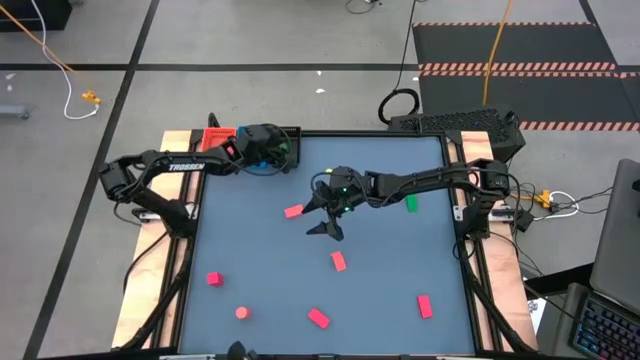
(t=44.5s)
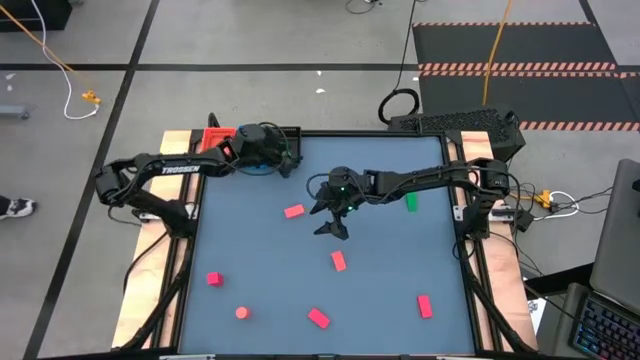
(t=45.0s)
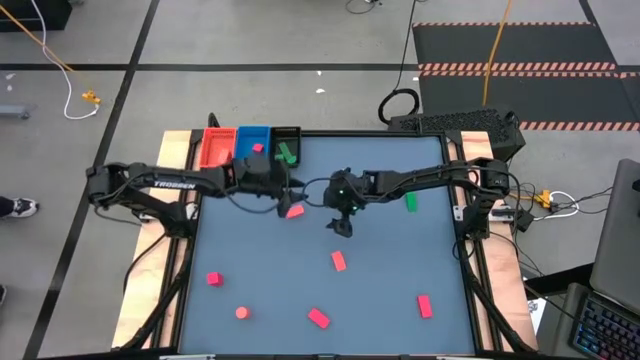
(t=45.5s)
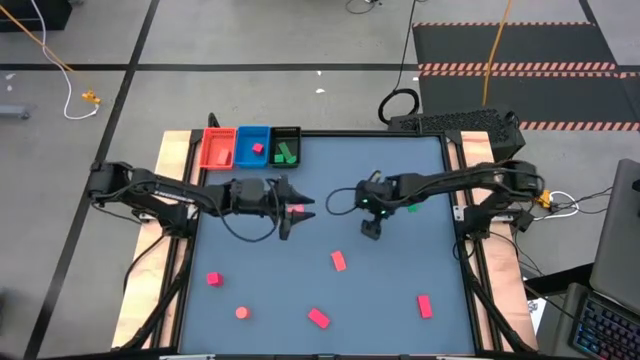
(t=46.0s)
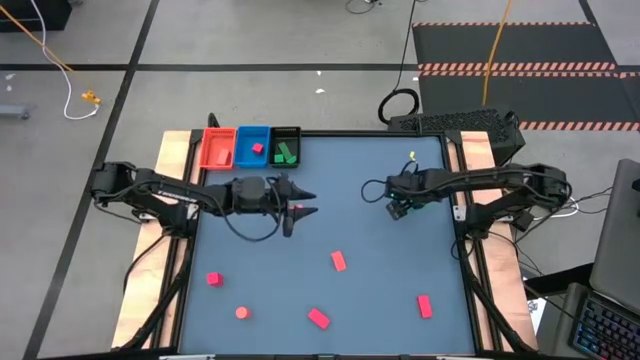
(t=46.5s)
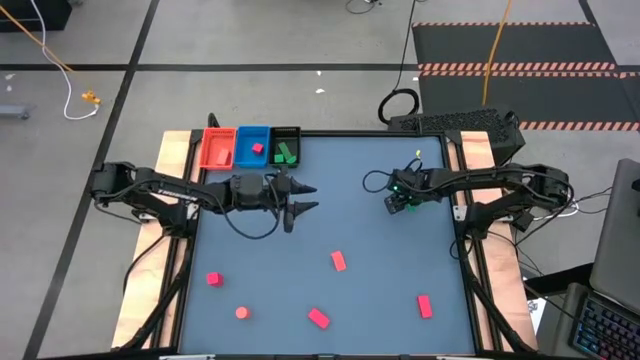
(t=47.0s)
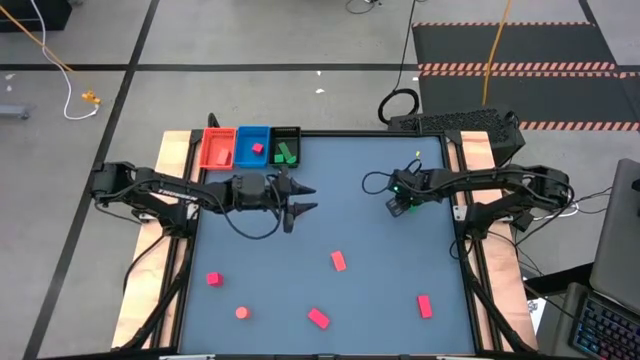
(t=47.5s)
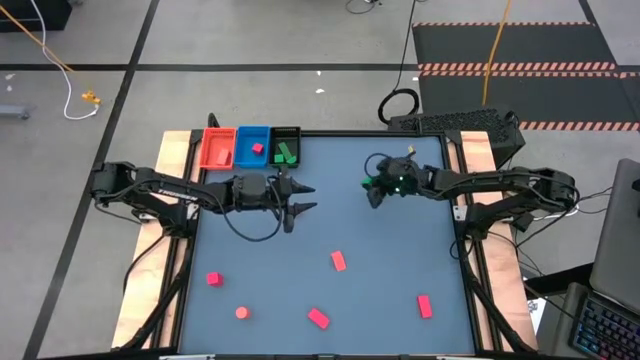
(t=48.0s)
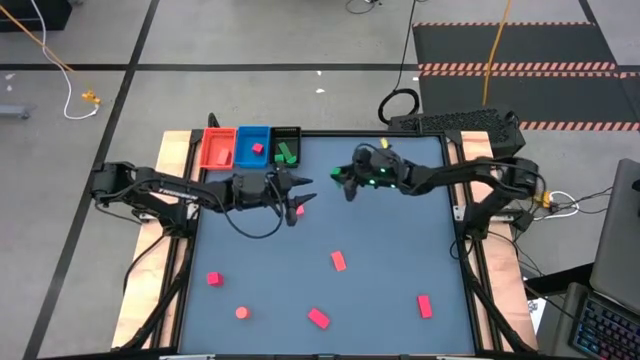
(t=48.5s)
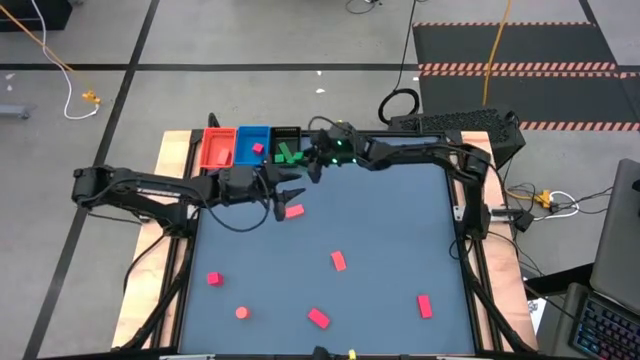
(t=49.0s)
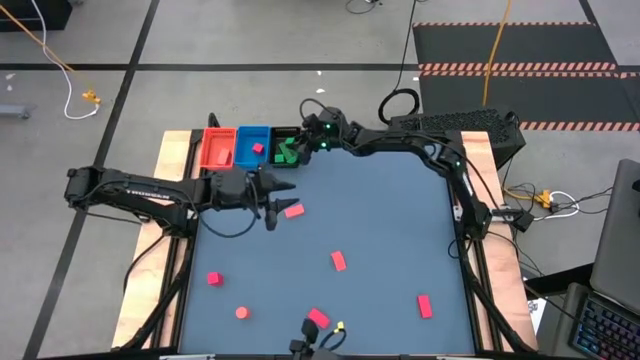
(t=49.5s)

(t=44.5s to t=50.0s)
Task: Sort & place blocks by color
Put the green block into the black bin

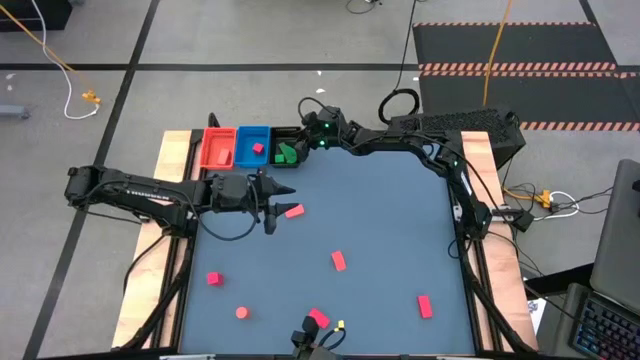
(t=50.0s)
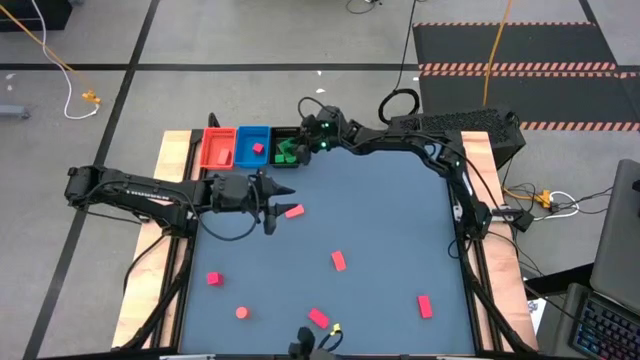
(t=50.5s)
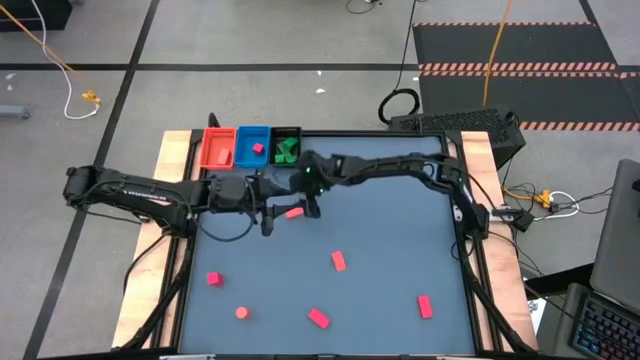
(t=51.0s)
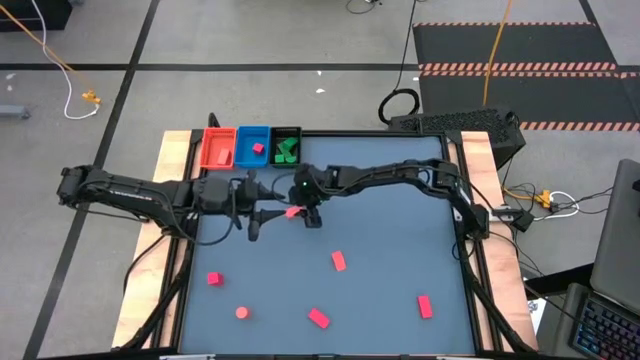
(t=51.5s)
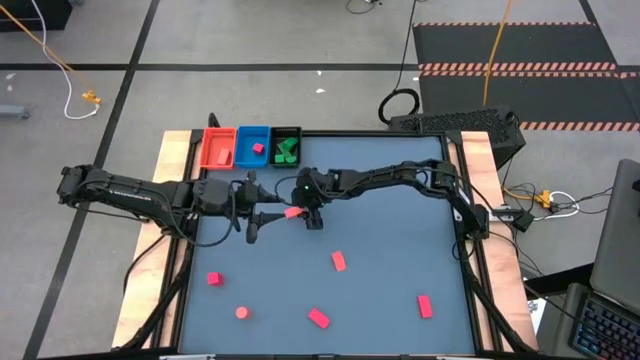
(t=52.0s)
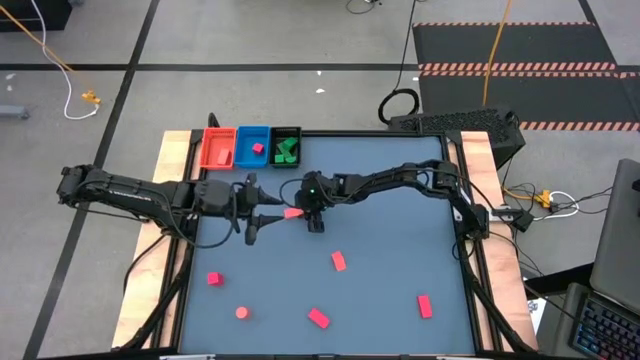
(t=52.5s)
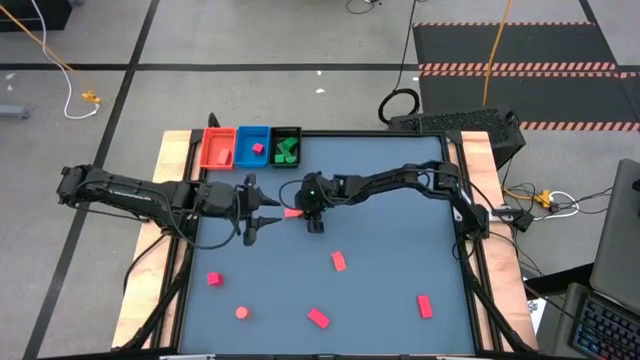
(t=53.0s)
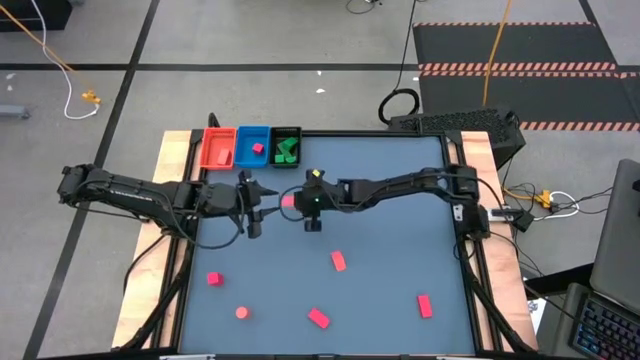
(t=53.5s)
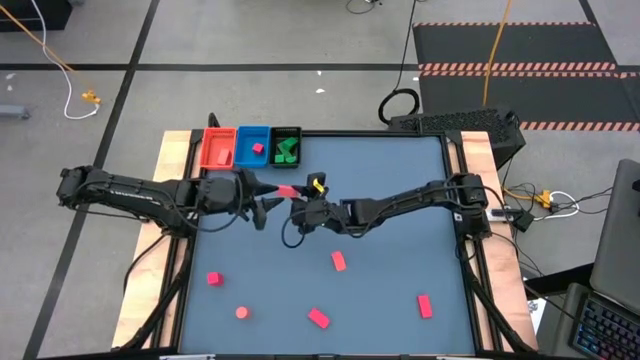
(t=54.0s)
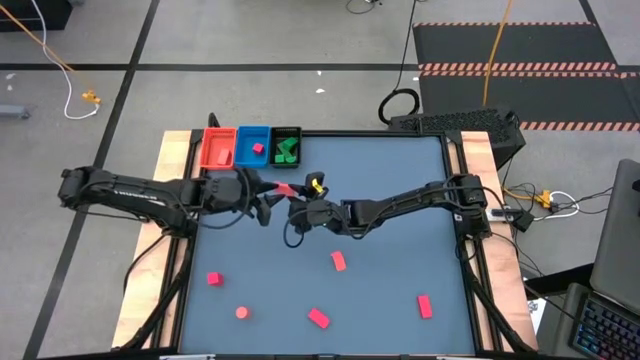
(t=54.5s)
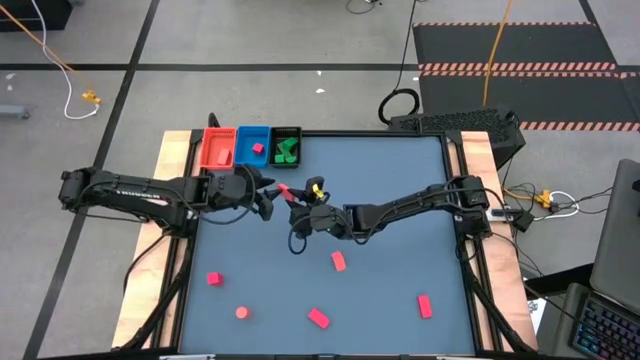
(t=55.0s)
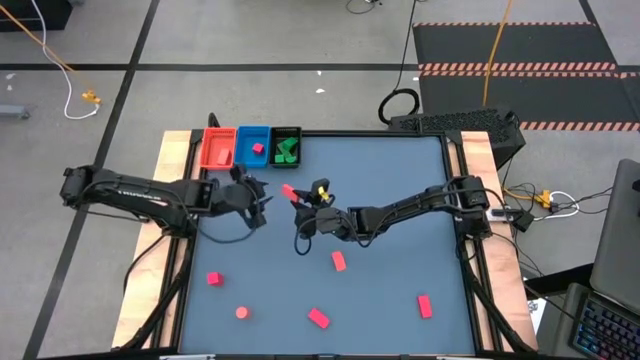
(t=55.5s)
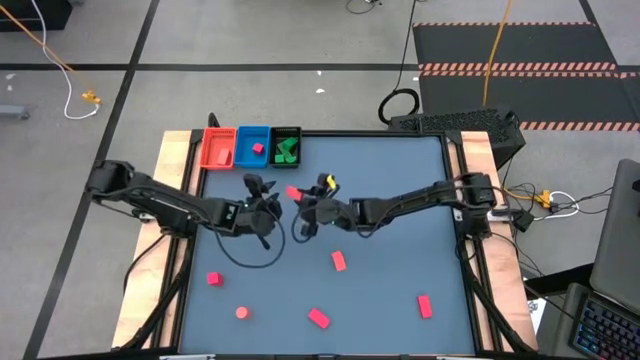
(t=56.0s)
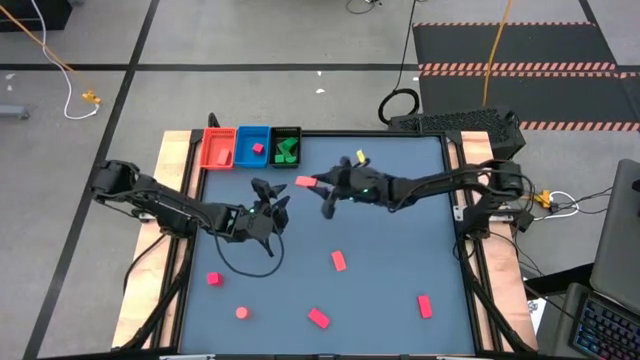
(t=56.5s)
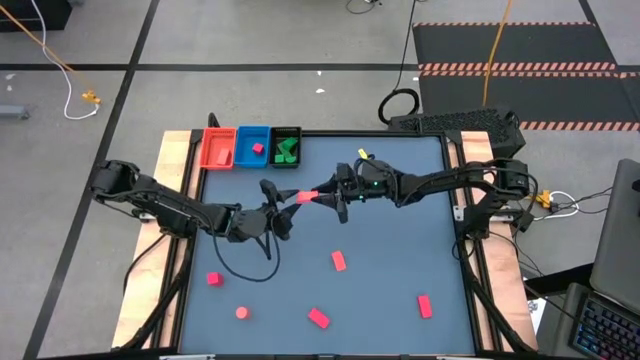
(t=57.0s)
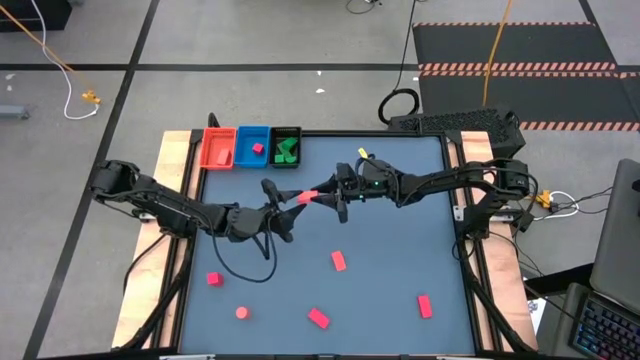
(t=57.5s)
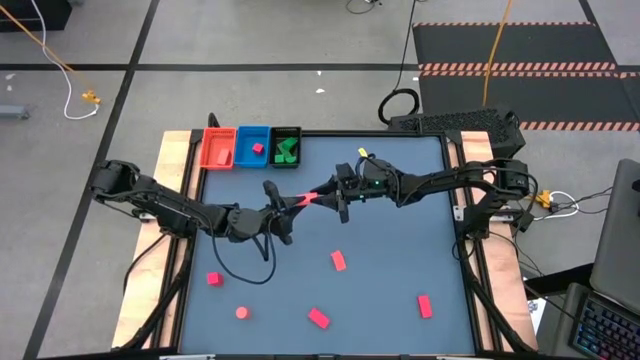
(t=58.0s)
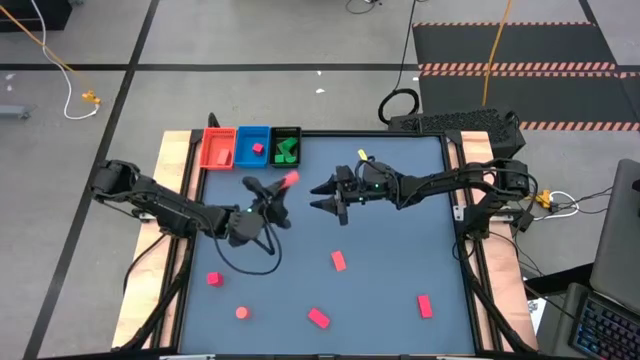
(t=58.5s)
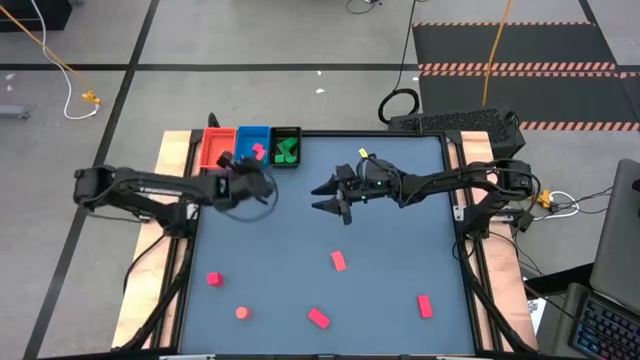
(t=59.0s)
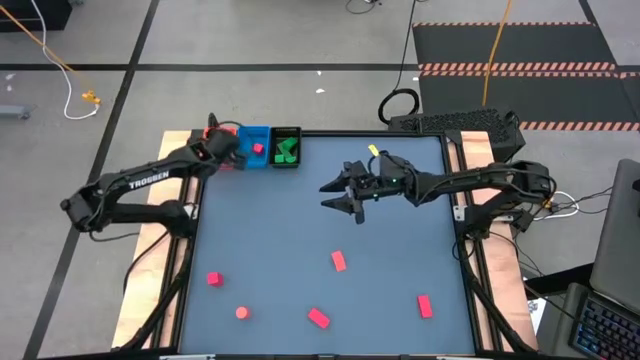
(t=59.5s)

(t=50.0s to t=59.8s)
Put the orange block into the orange bin

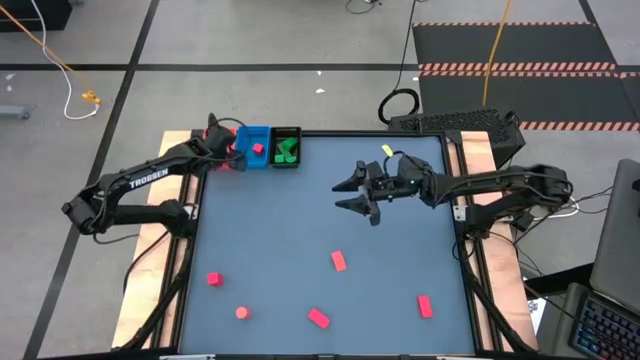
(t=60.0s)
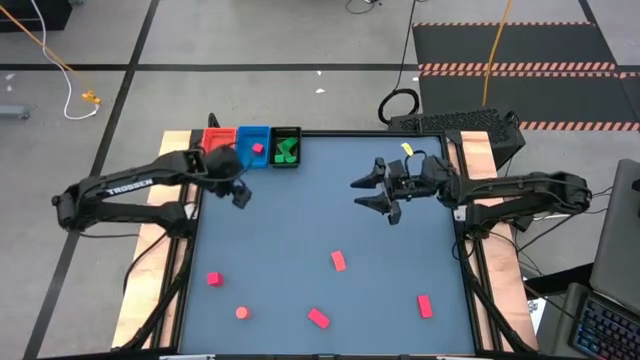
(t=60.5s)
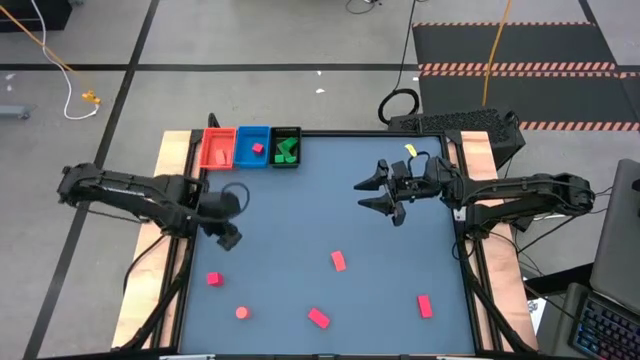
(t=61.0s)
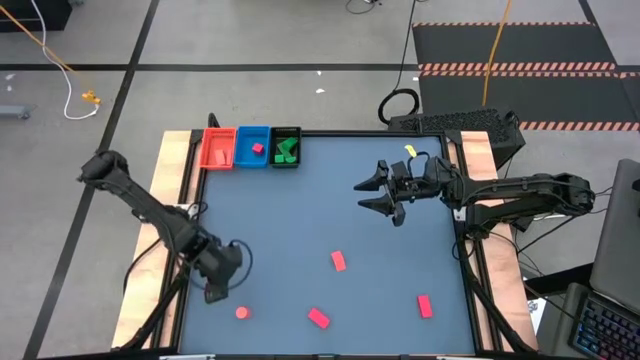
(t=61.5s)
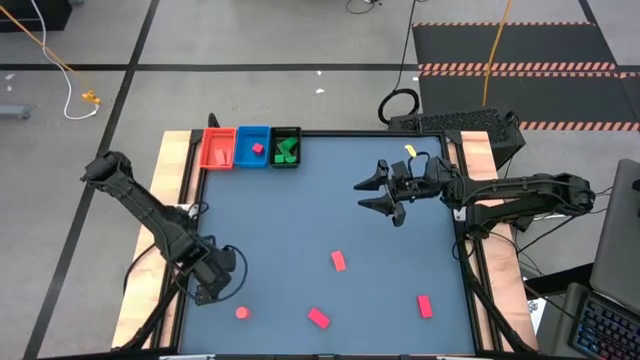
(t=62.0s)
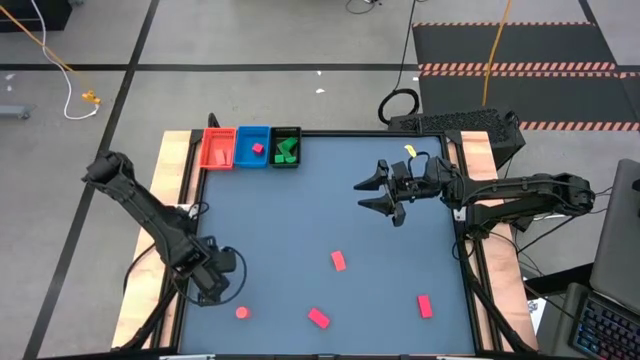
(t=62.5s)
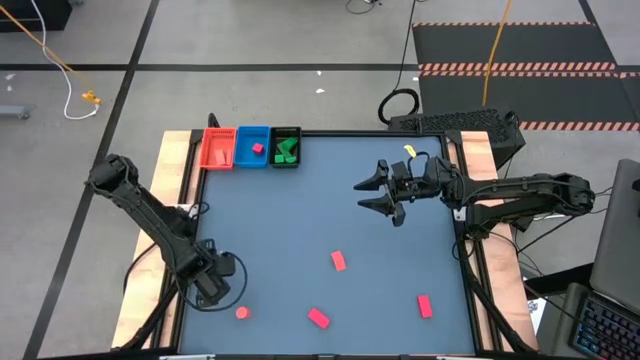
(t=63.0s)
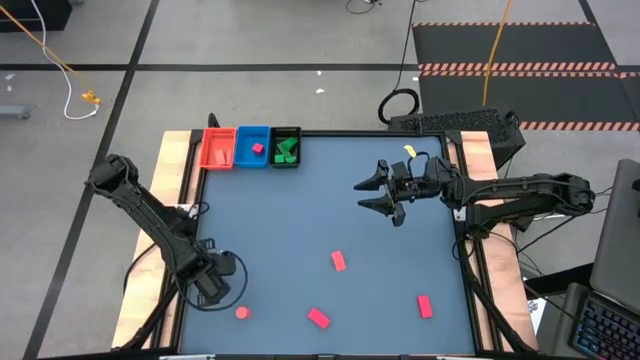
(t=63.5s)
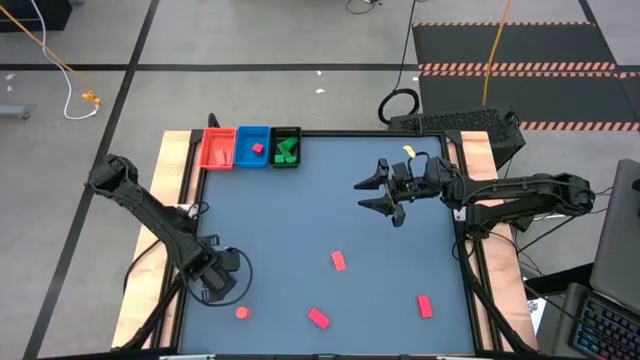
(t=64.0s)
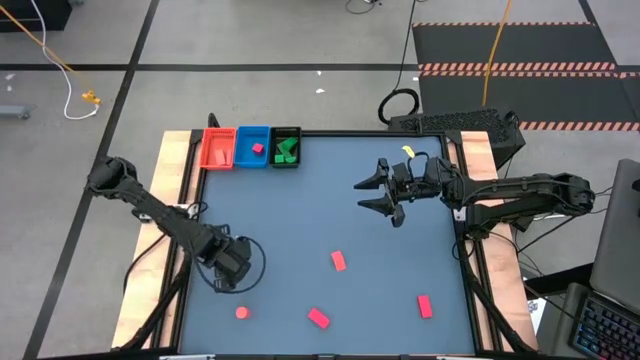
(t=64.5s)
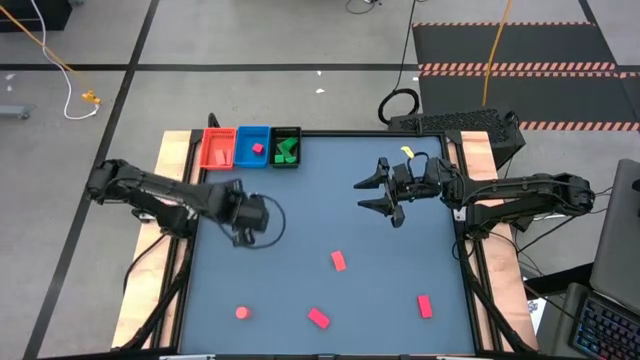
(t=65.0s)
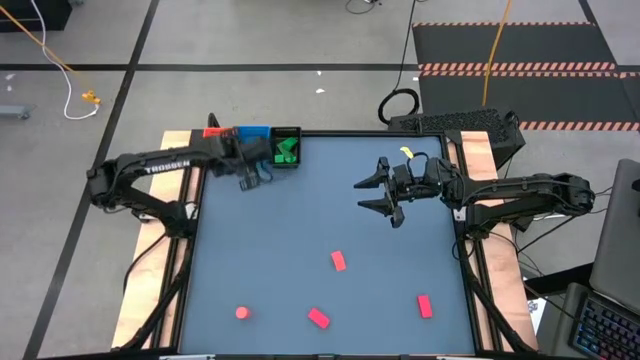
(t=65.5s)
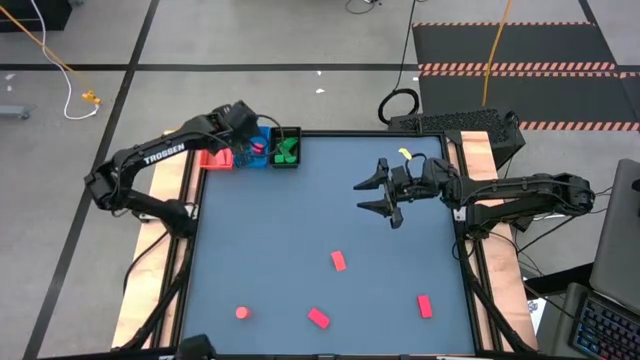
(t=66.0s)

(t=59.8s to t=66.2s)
Put the red block into the blue bin
